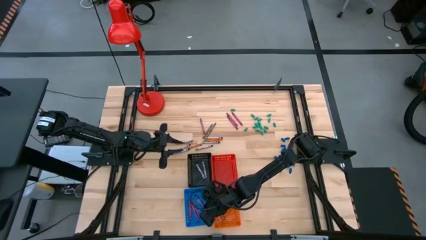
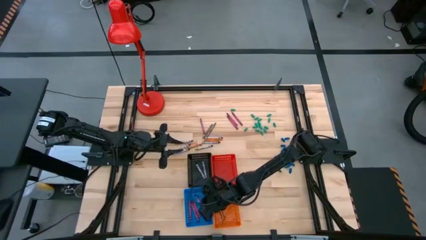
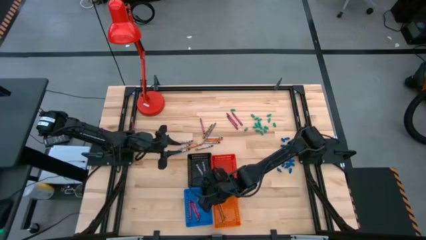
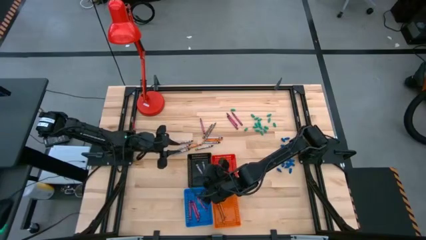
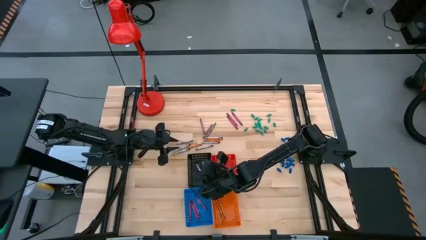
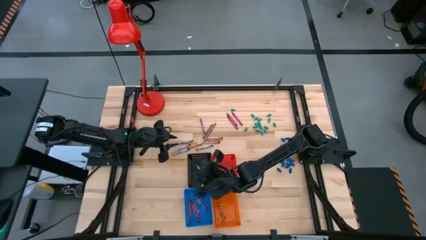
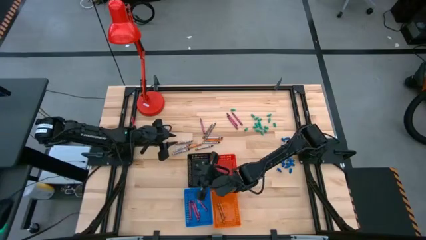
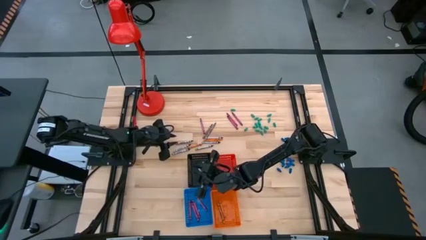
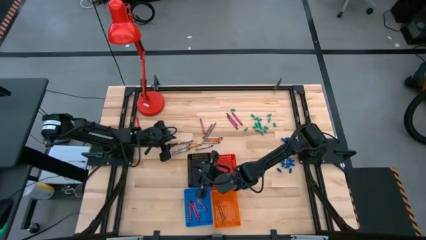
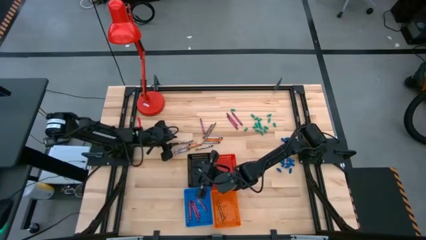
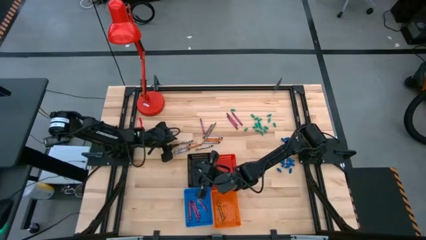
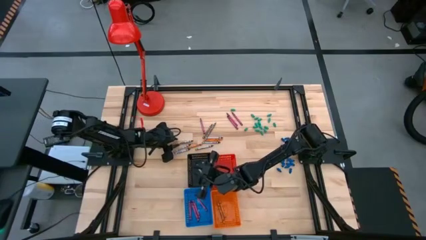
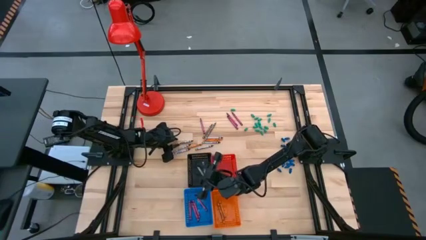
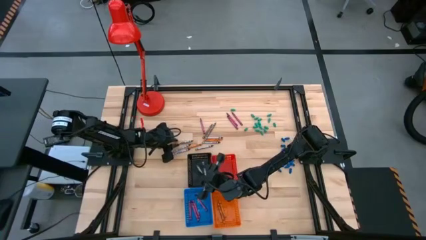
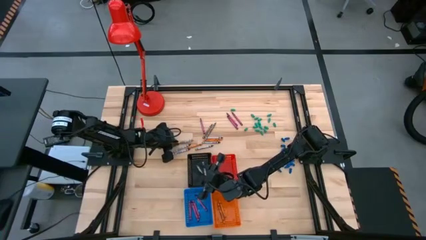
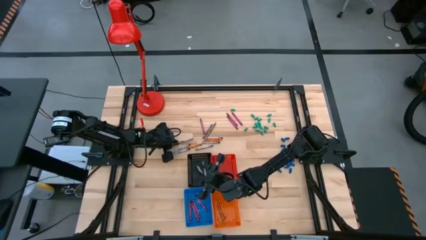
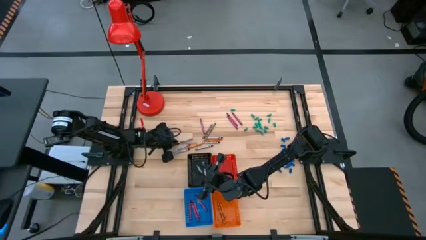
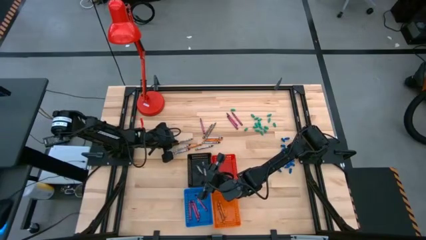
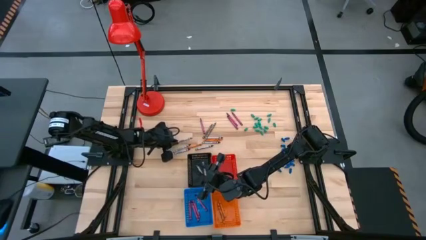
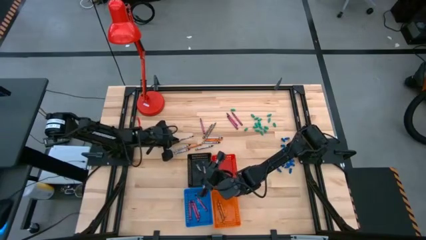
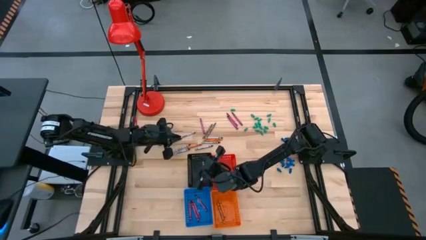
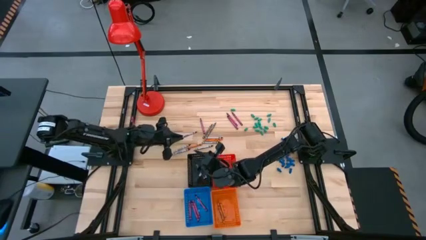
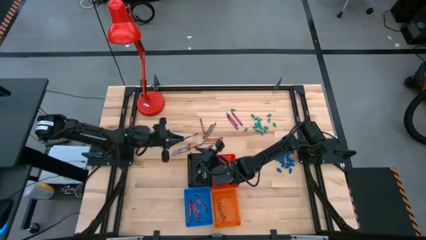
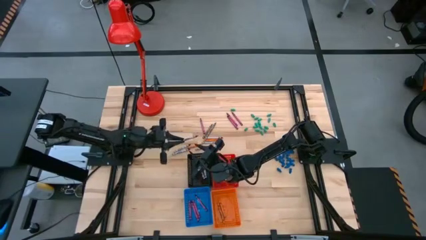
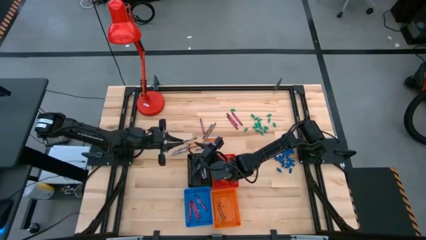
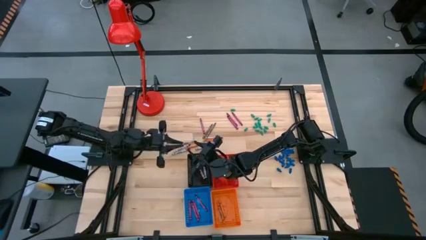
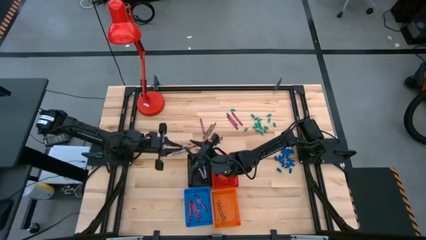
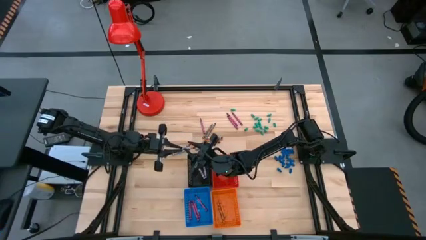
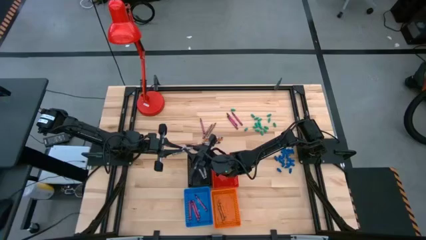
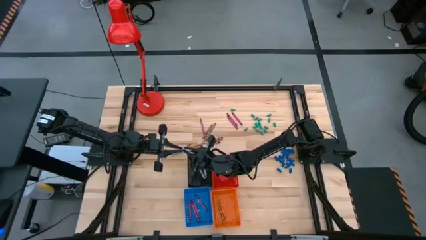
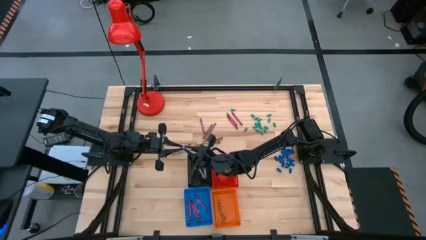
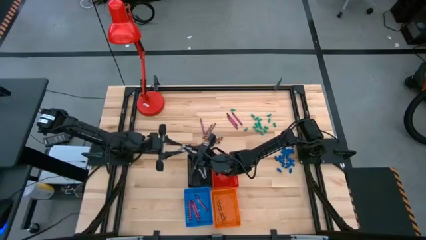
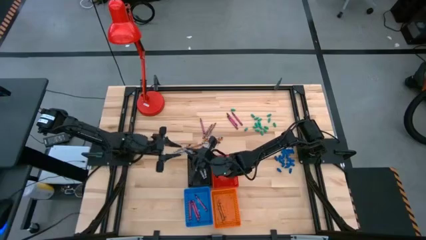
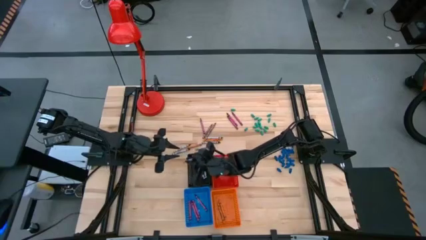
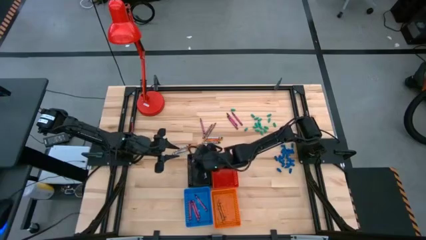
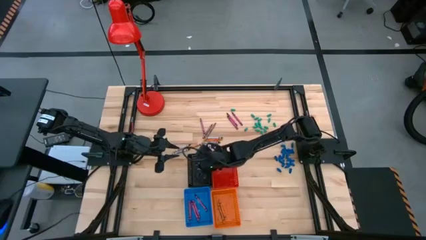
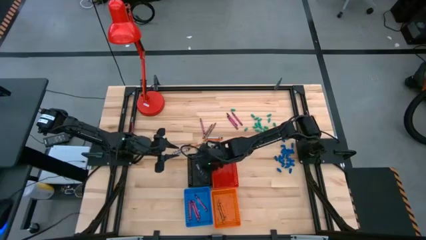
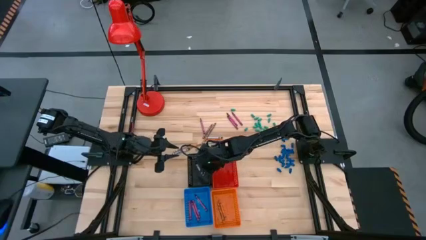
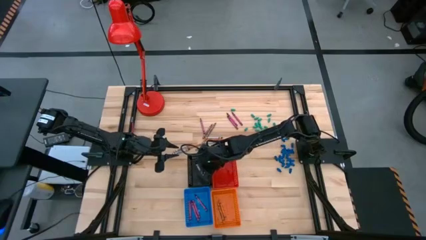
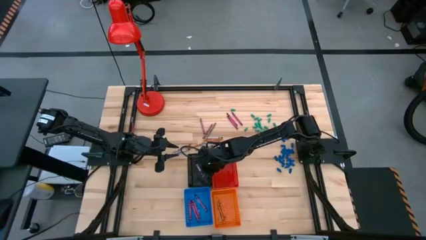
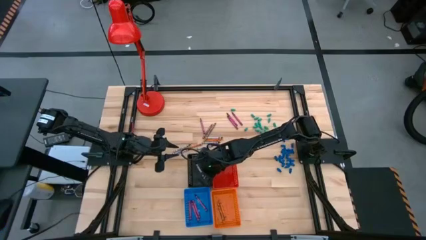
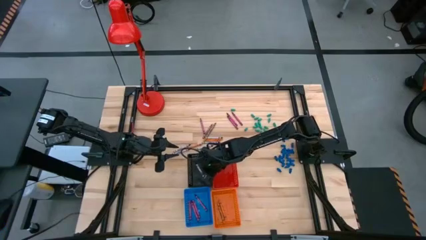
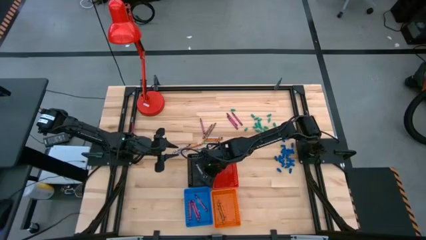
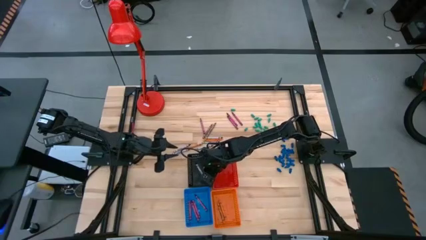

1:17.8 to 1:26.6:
Task: Sort crayons
Put the black crayon into the black basket

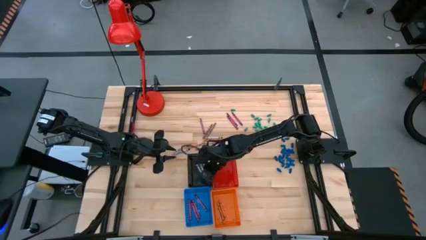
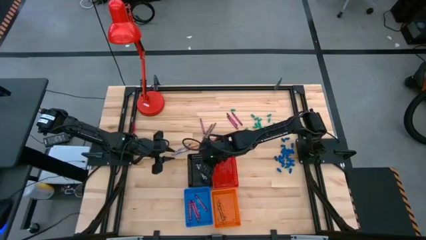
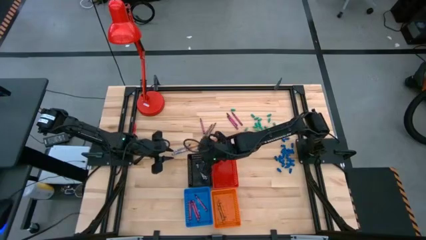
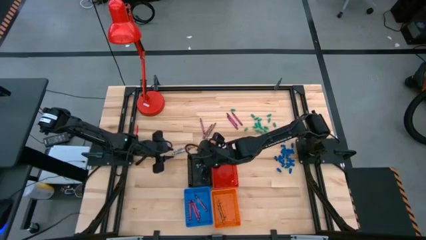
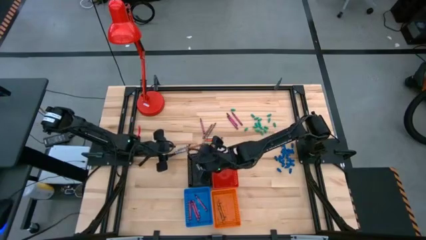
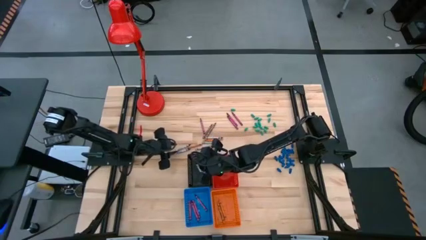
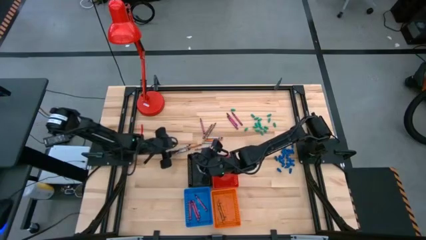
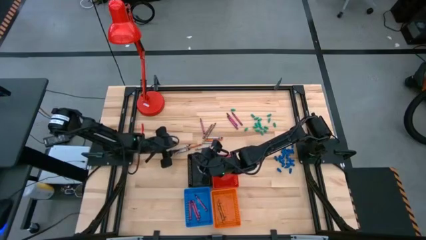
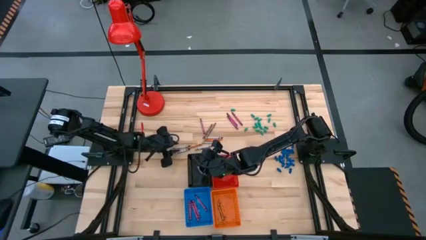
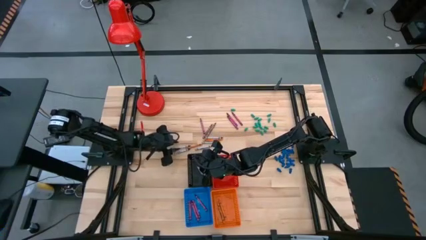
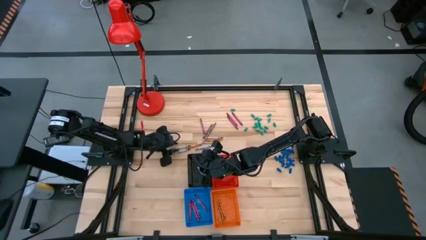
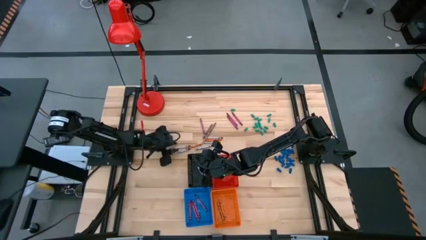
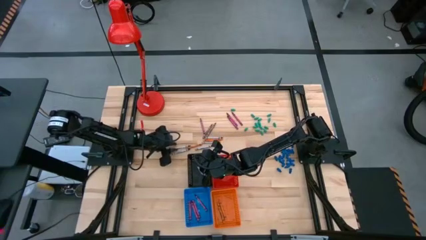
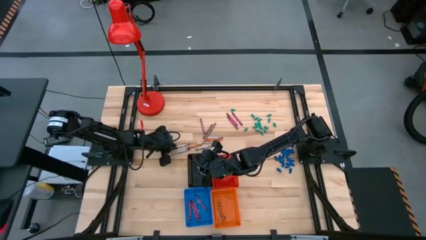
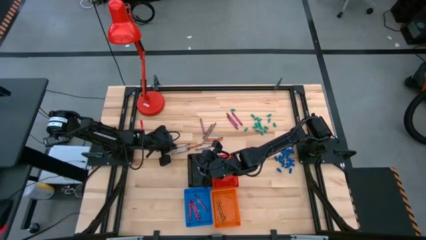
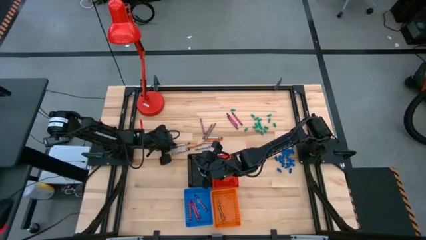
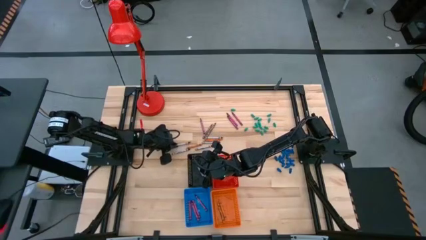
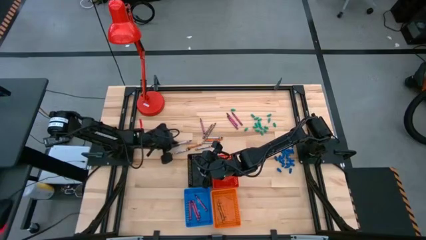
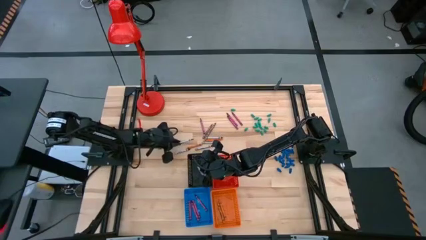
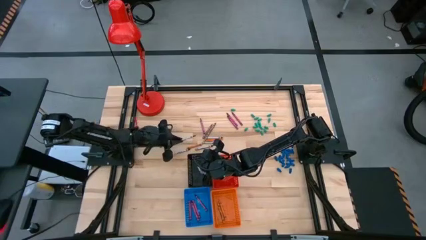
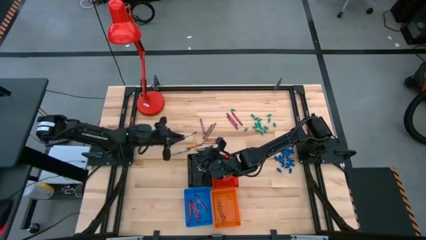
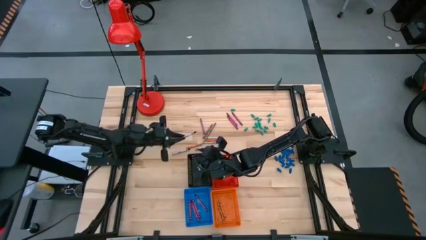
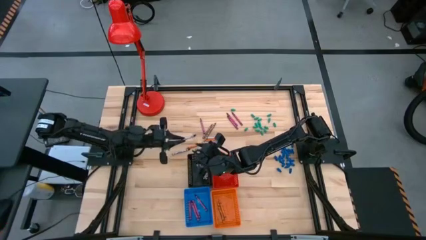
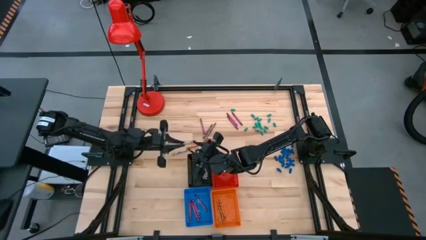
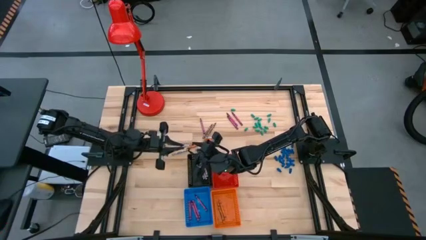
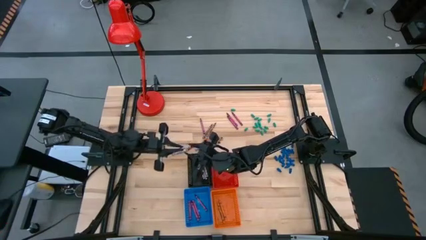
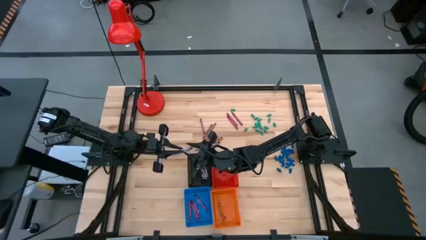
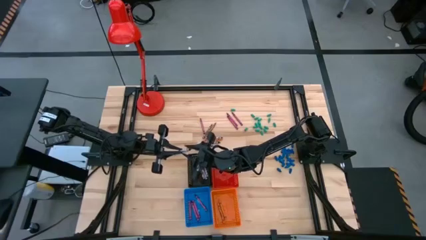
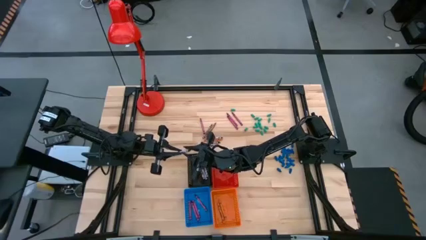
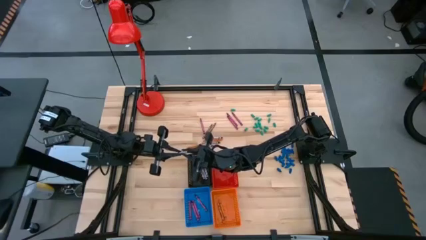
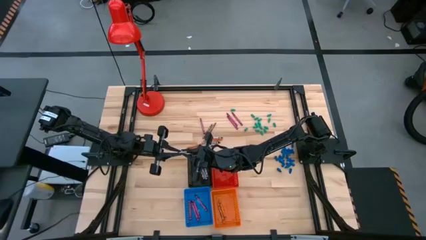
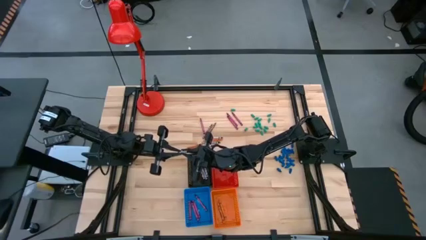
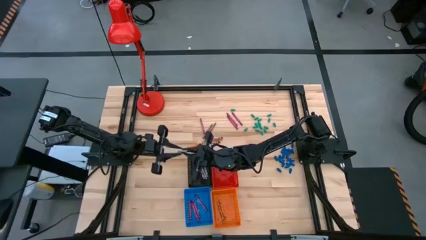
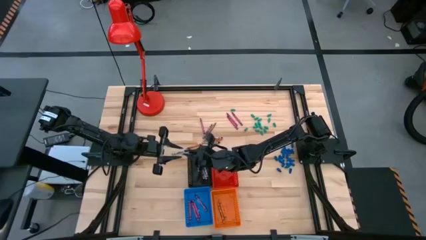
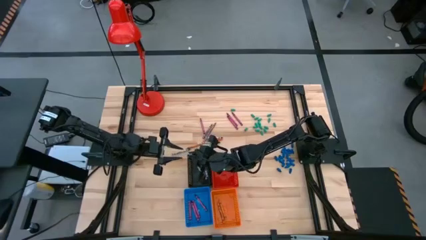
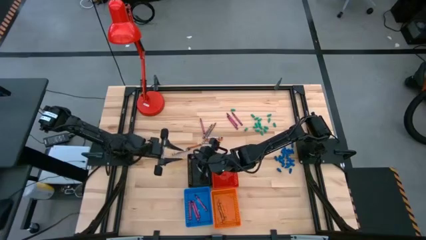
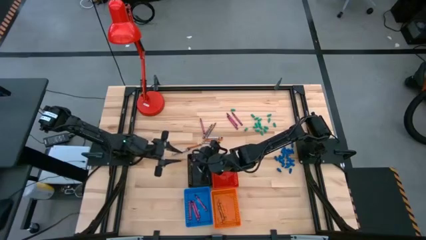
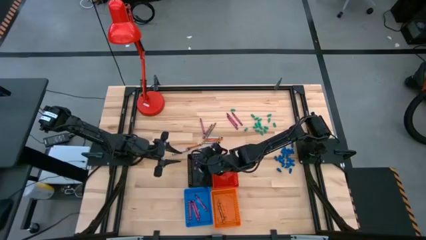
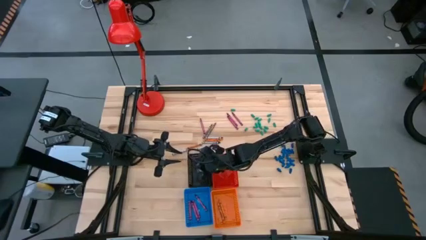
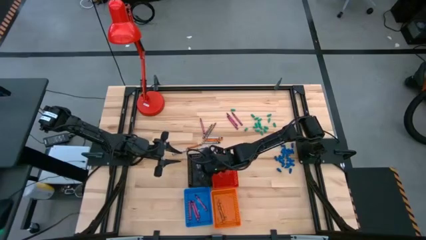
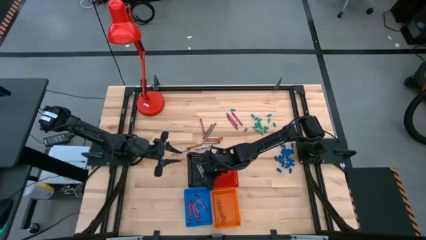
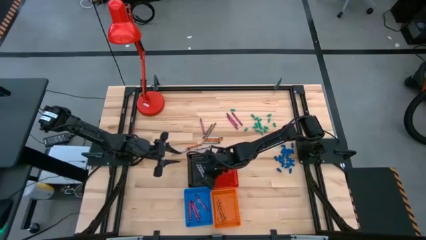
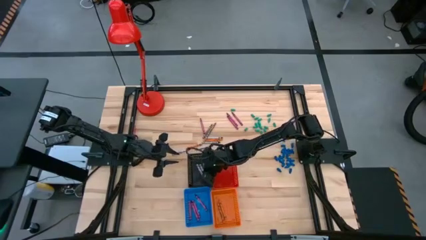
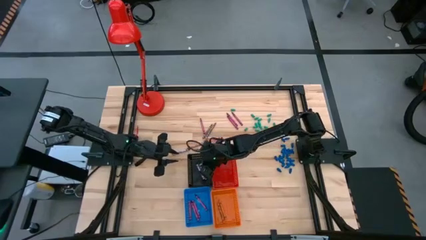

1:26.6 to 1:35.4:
Put the black crayon into the black basket
